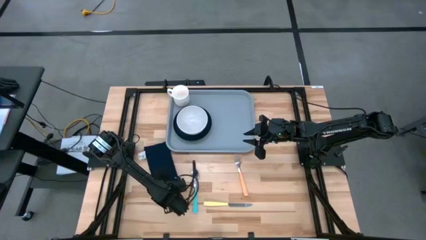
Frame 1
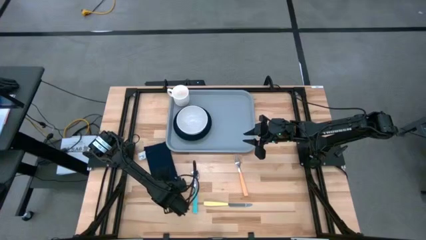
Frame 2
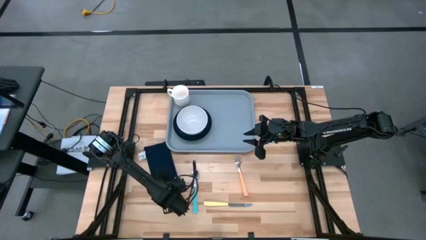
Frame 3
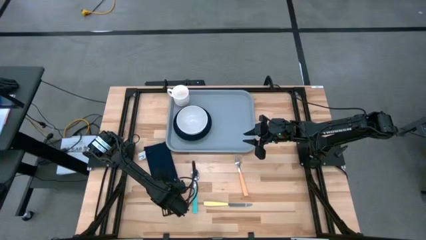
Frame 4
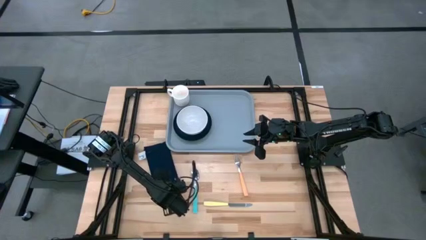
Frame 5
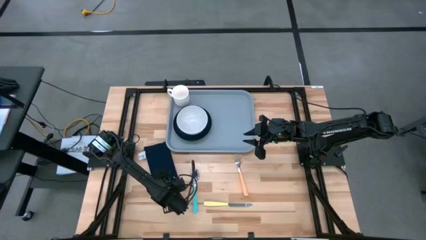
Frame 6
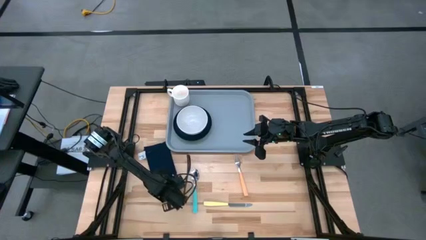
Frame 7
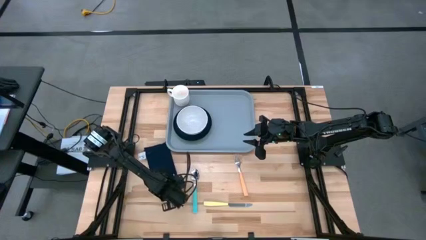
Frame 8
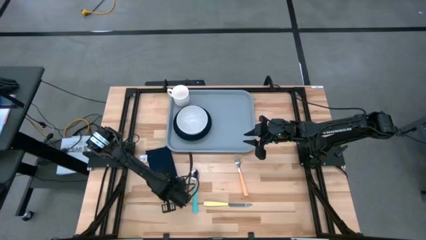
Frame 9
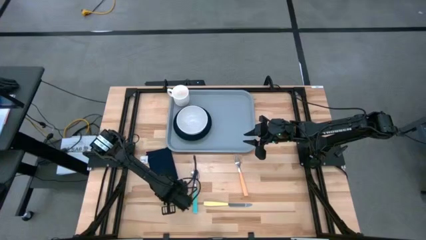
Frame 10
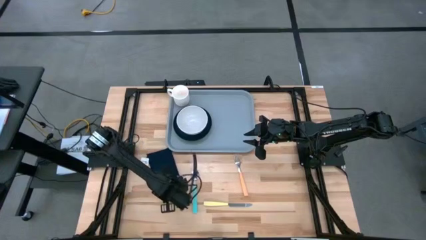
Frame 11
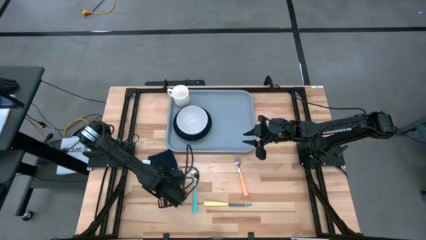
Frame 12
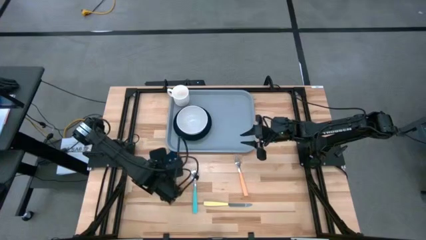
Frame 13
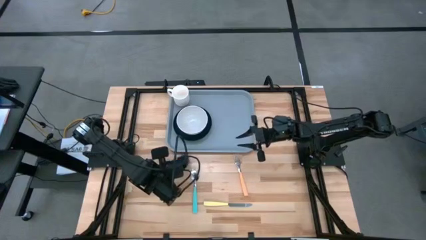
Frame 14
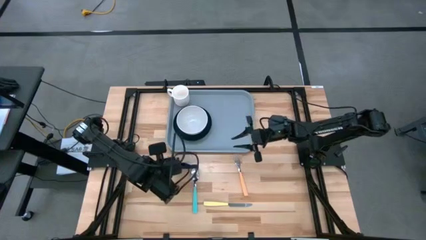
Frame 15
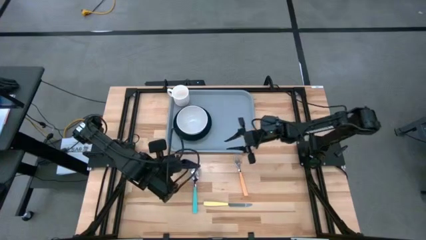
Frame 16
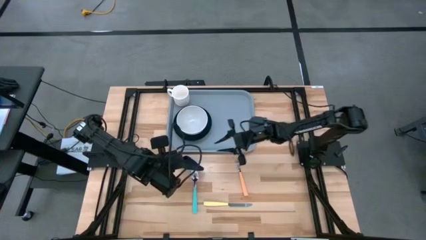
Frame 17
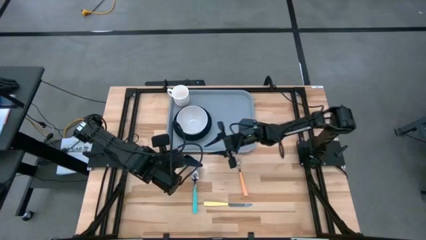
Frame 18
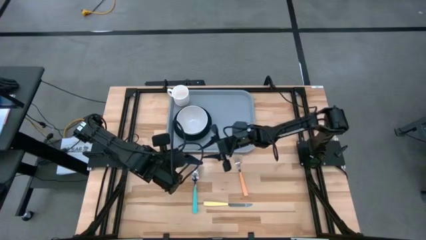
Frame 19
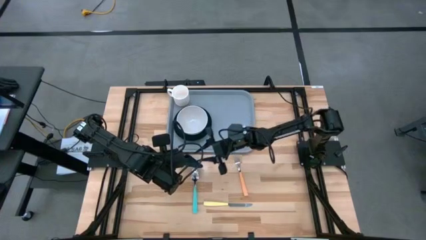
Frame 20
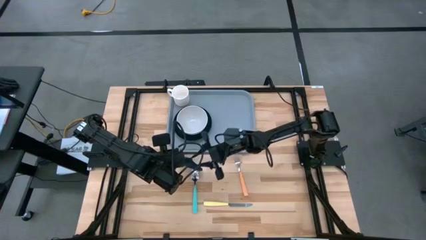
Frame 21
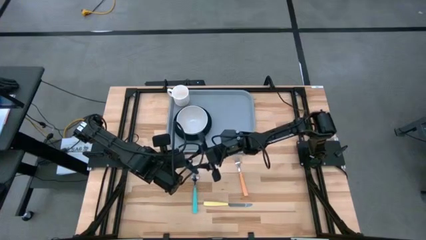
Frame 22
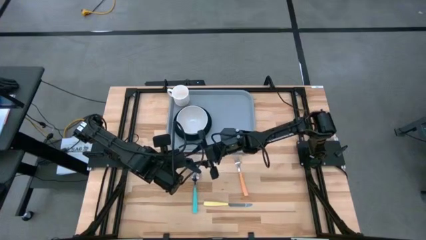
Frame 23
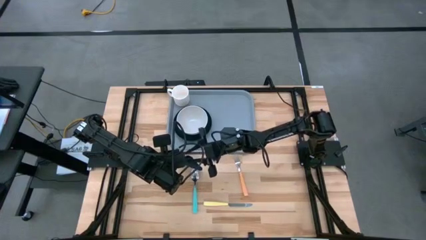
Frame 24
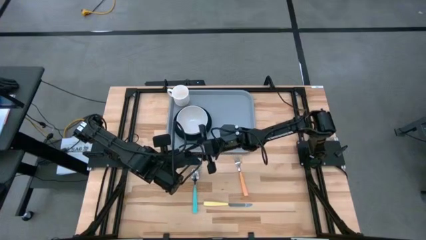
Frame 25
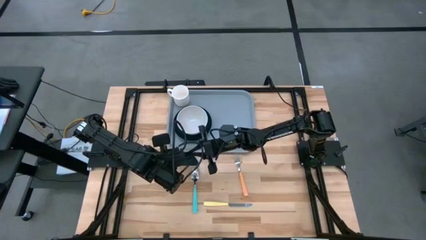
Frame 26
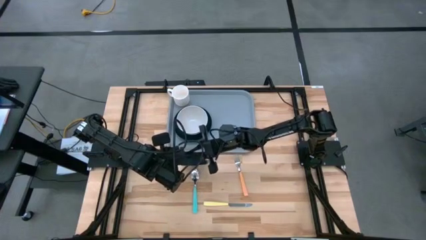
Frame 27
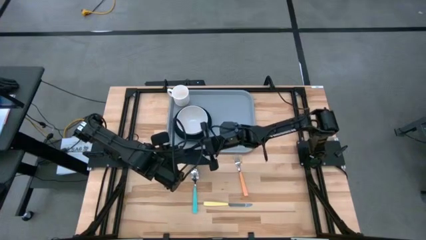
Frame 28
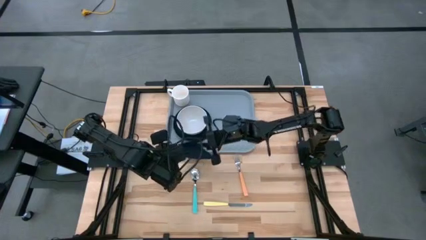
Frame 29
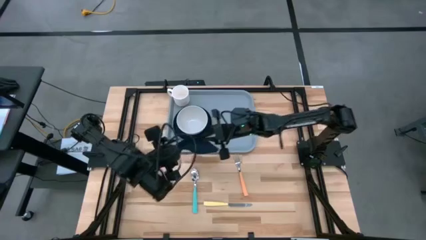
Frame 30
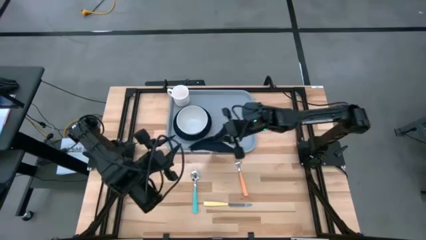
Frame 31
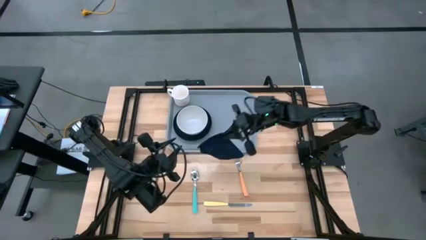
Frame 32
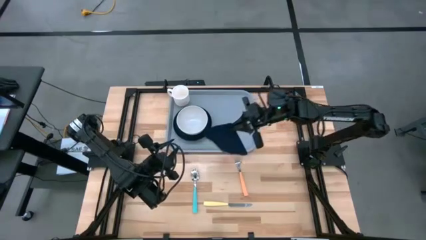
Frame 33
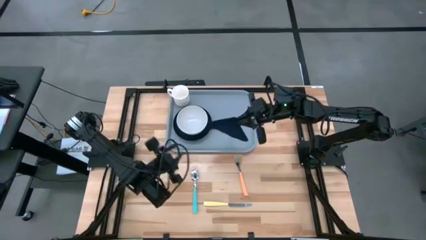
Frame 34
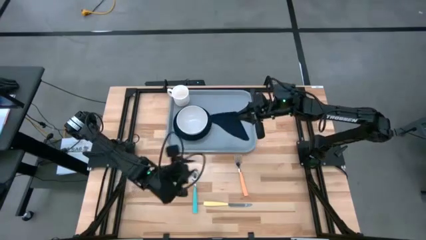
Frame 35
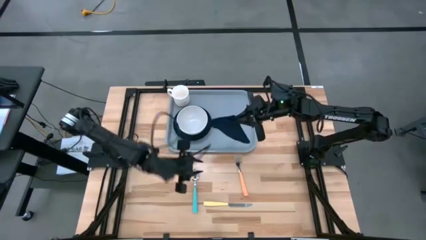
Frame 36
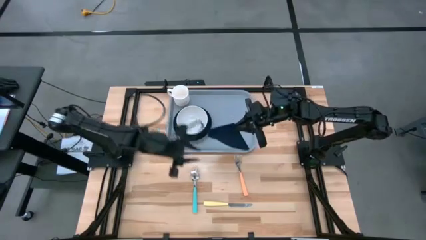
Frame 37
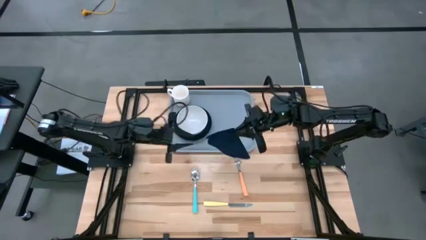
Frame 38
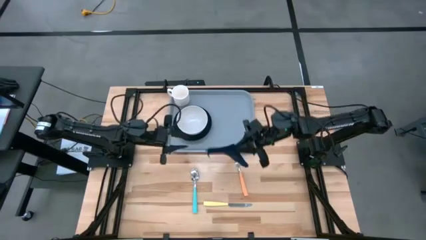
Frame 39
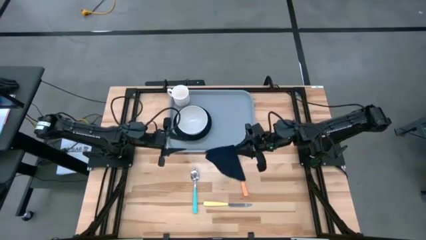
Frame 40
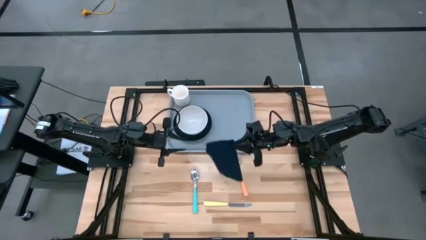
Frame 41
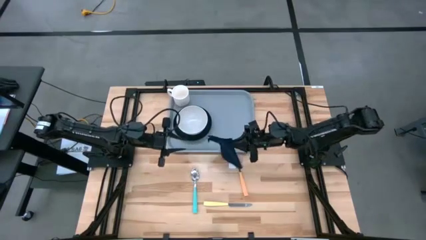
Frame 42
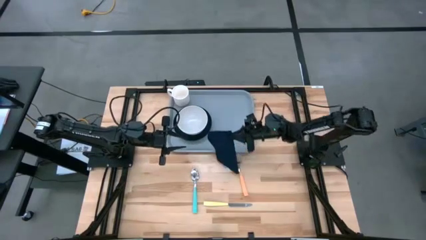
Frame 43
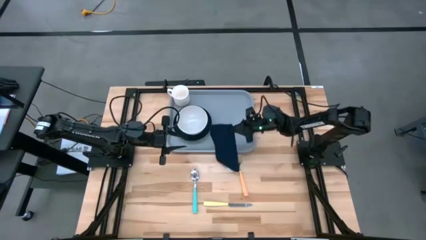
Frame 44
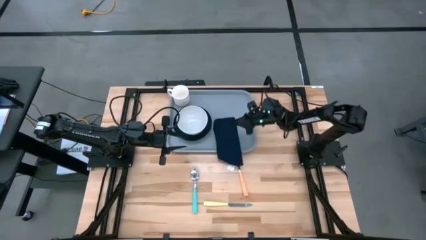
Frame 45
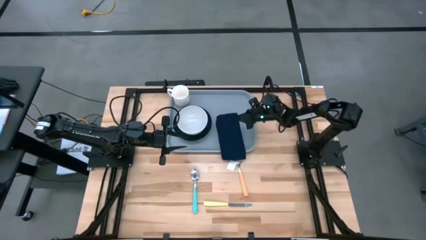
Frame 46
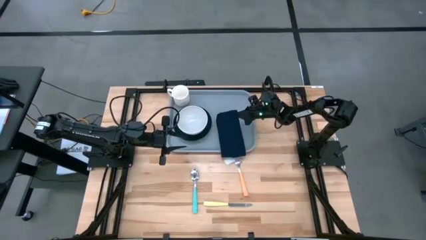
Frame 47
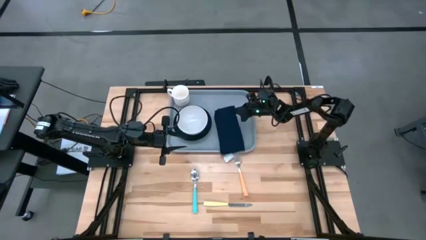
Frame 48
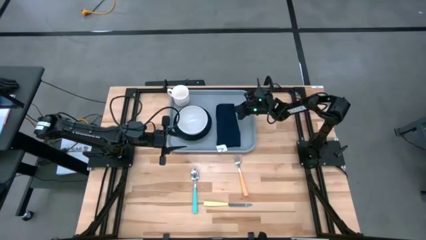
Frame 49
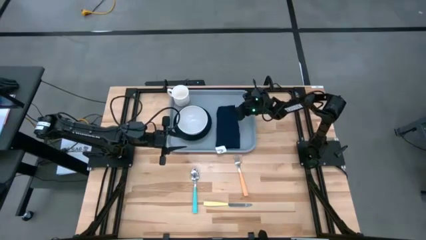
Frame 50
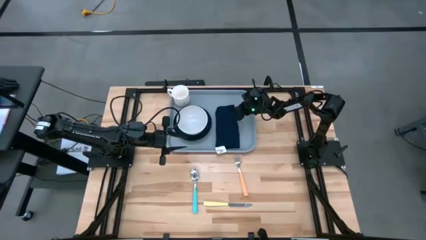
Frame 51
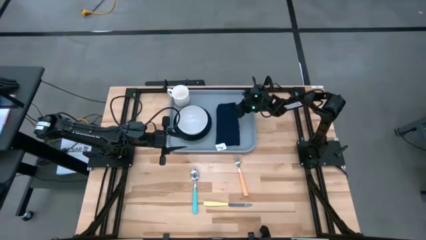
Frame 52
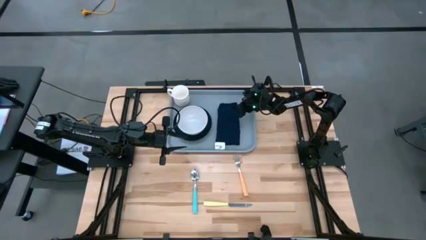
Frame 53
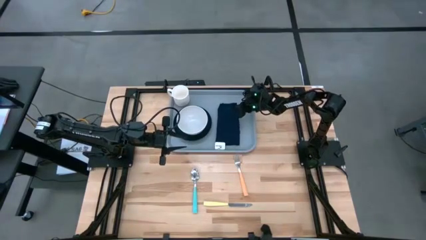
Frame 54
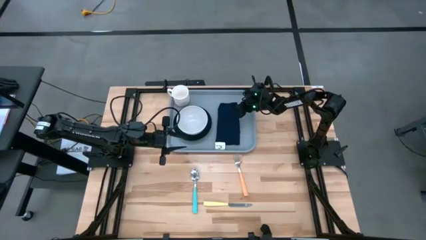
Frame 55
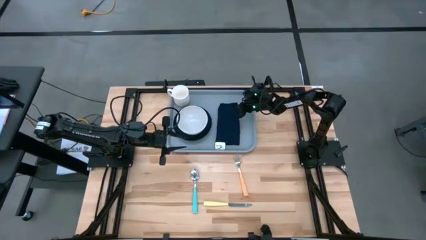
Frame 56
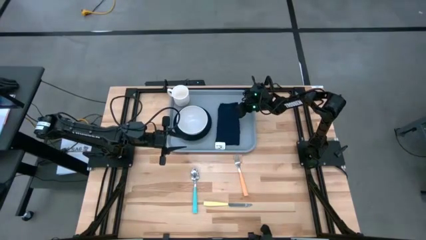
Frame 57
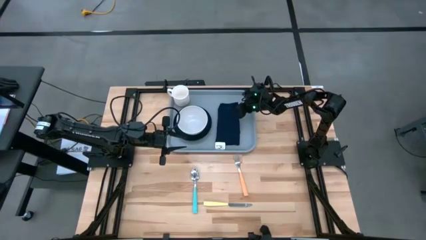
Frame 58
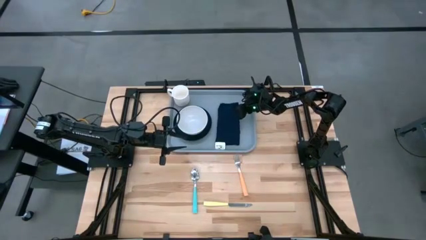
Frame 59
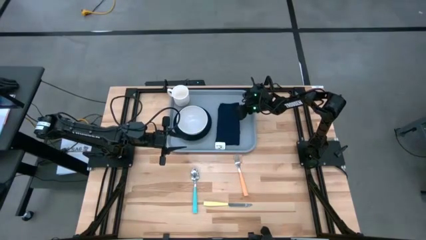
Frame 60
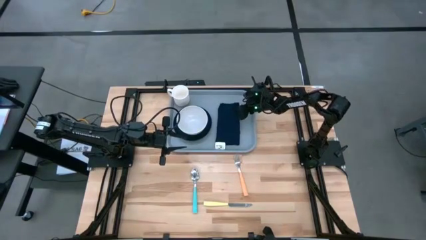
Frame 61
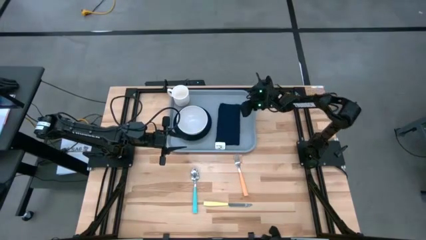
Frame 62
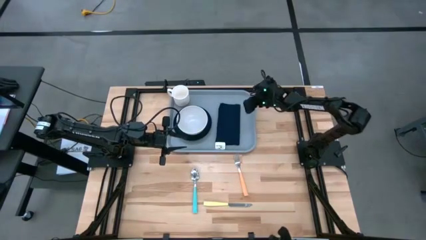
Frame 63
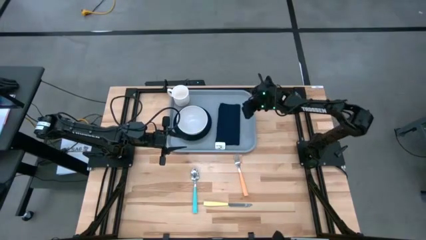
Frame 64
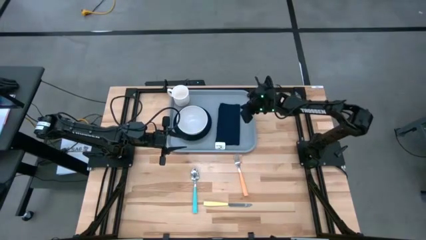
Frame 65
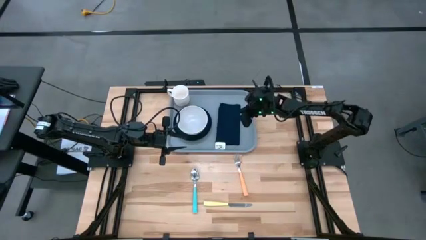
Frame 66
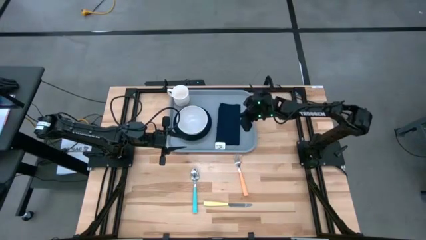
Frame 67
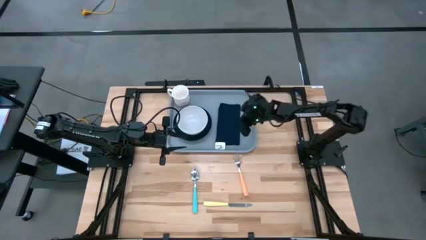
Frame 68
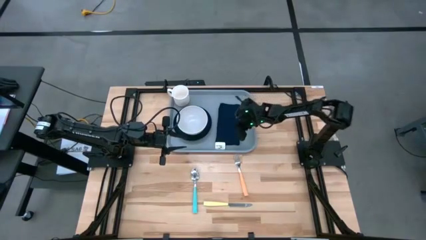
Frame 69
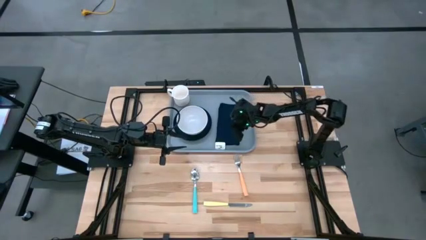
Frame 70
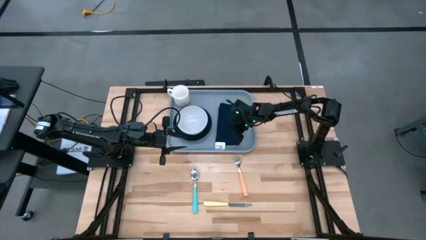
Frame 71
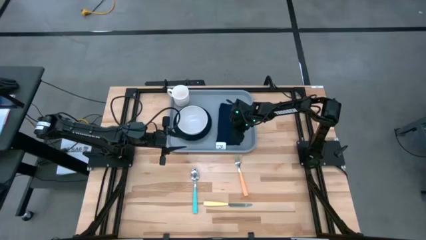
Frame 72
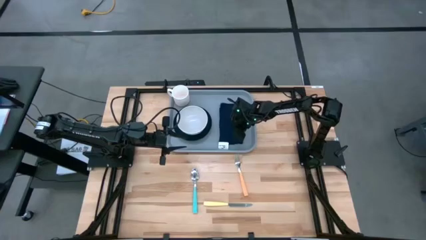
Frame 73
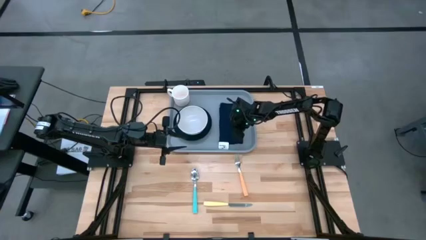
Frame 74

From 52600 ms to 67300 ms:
Task: Set up tray
Put the blue napkin on the gray serving tray to the right of the green plate

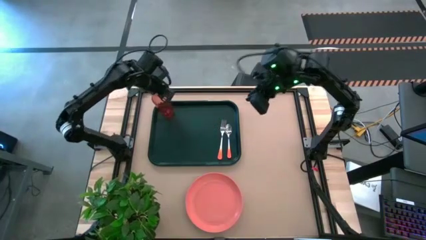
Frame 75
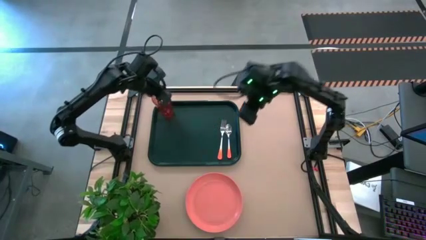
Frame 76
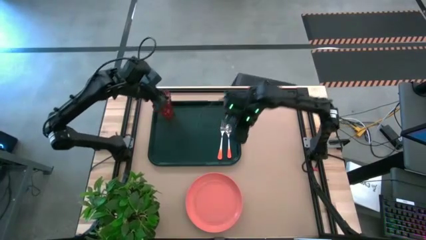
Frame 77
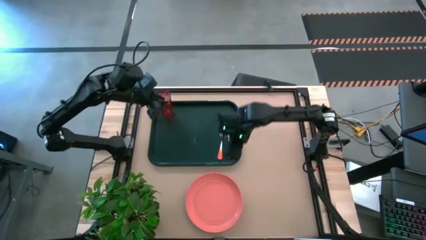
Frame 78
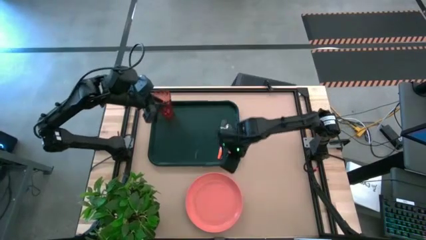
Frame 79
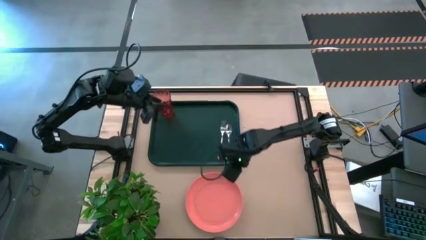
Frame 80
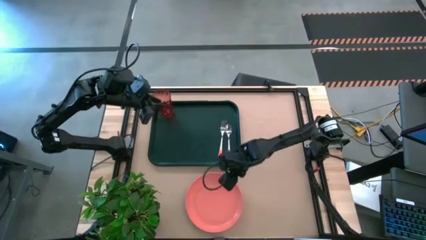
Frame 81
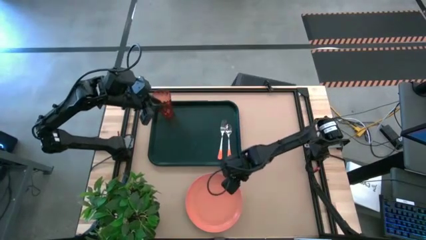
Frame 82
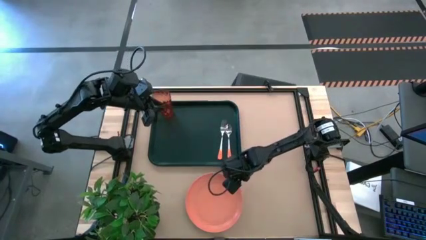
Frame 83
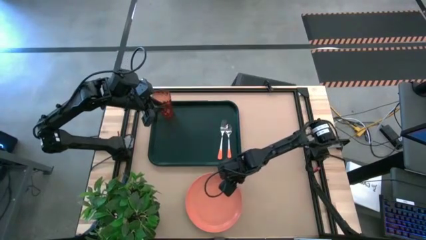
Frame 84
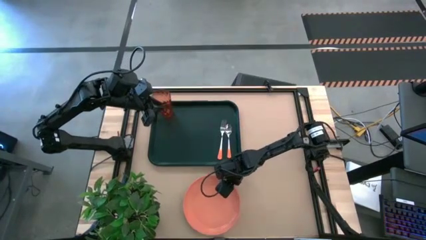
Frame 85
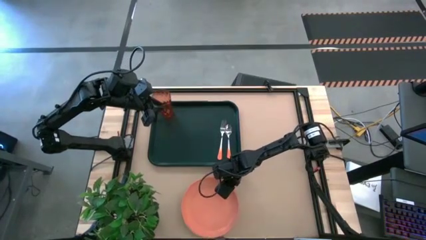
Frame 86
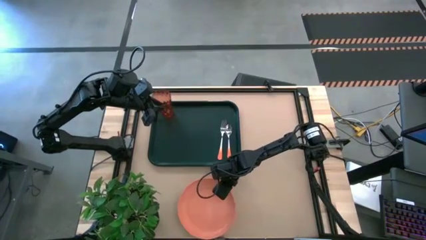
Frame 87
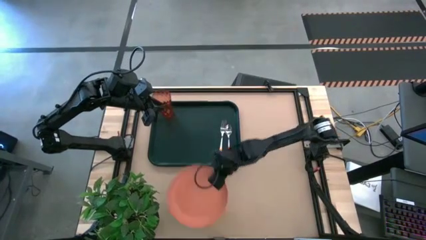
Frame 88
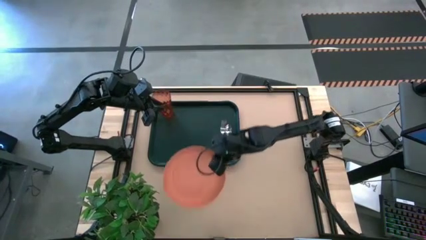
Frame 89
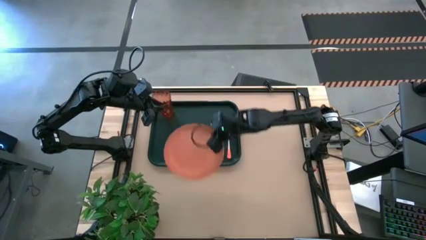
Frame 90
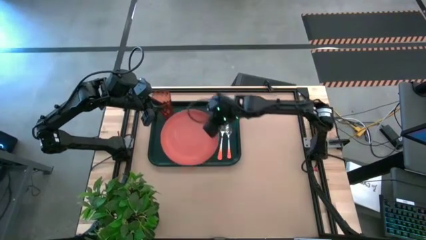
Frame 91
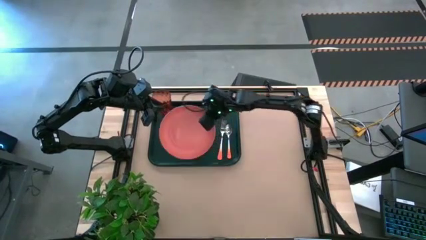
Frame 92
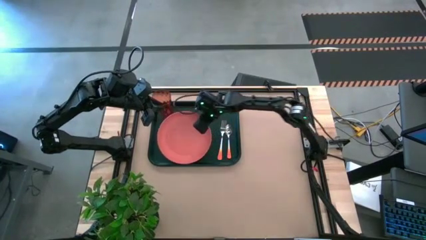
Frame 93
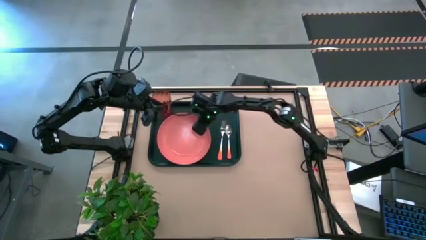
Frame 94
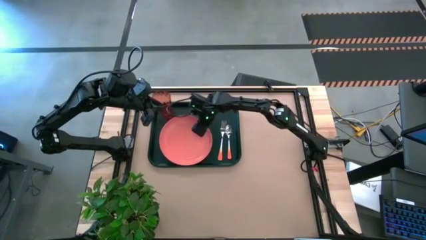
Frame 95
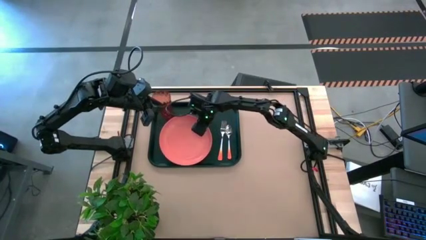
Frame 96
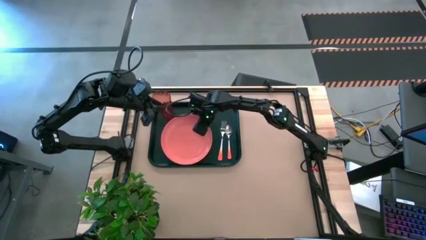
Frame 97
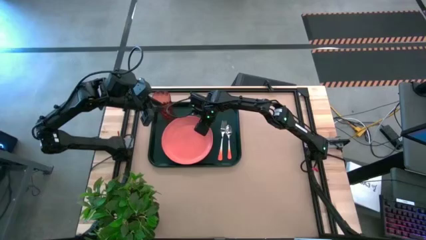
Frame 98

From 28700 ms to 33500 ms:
Task: Pick and place plate/cup/fork/spoon on tray
Put the orange plate on the black table tray
